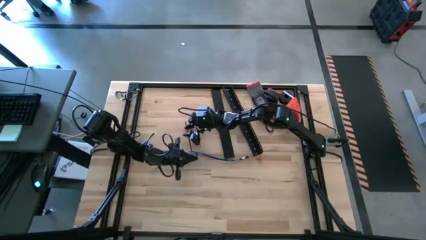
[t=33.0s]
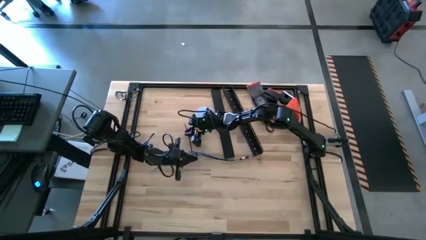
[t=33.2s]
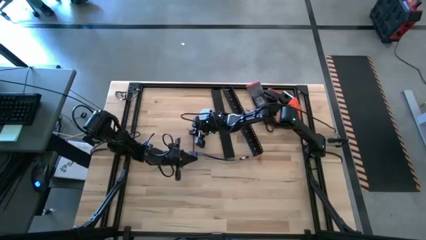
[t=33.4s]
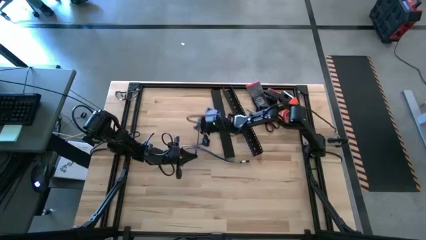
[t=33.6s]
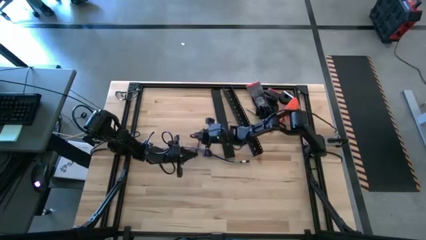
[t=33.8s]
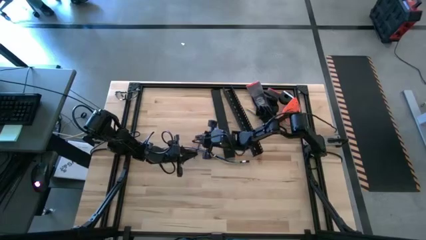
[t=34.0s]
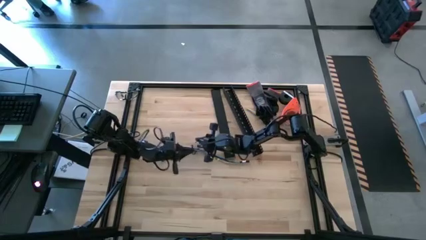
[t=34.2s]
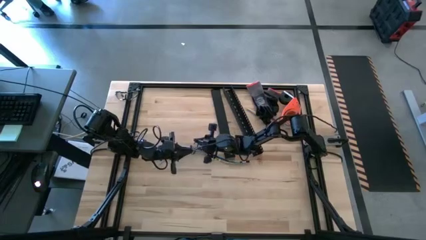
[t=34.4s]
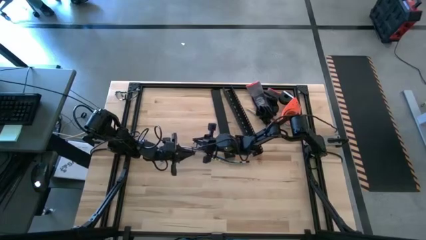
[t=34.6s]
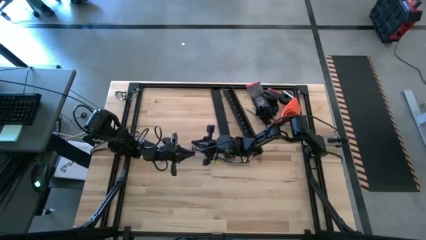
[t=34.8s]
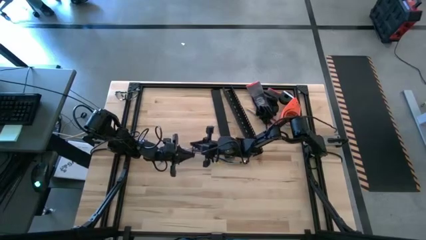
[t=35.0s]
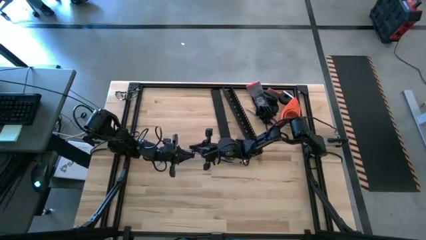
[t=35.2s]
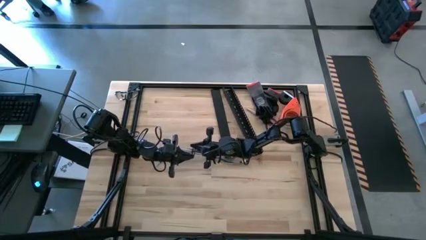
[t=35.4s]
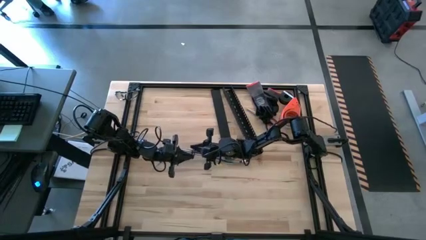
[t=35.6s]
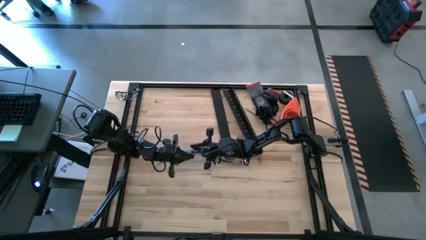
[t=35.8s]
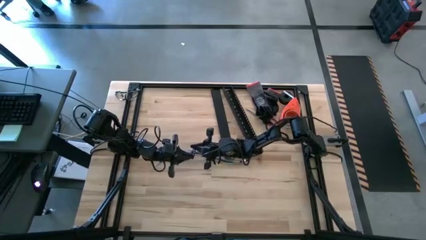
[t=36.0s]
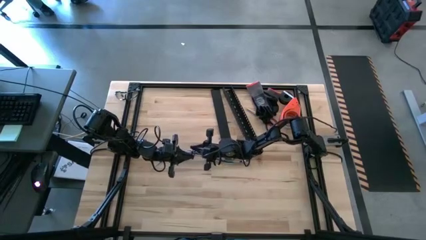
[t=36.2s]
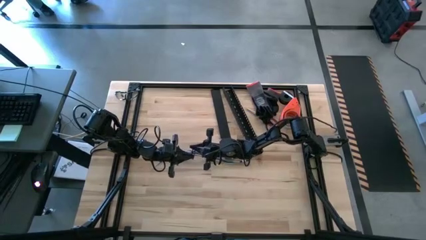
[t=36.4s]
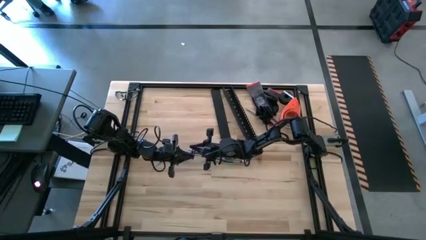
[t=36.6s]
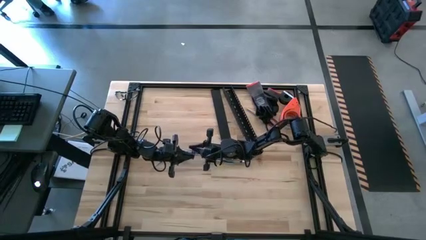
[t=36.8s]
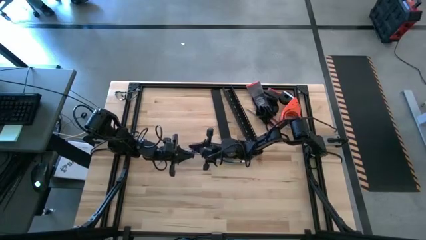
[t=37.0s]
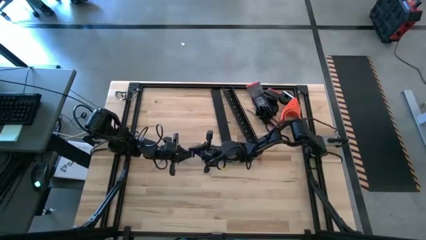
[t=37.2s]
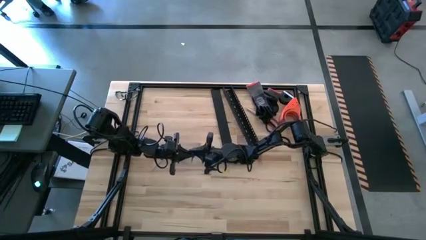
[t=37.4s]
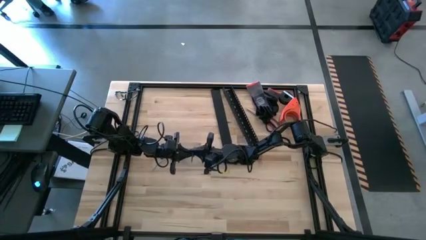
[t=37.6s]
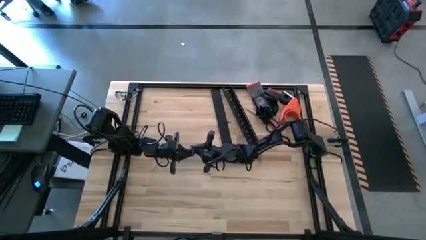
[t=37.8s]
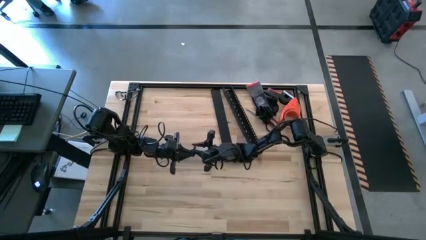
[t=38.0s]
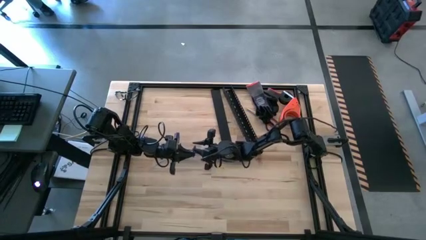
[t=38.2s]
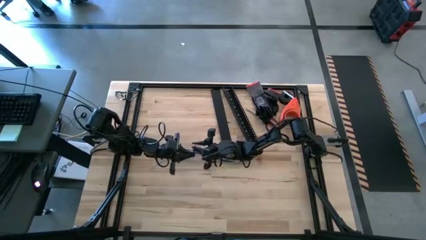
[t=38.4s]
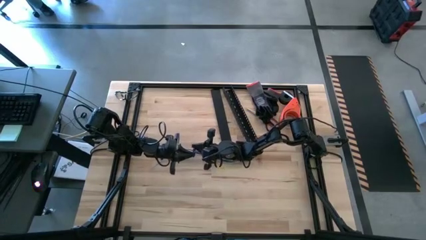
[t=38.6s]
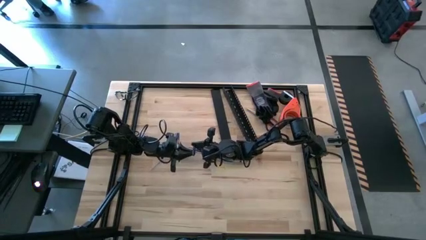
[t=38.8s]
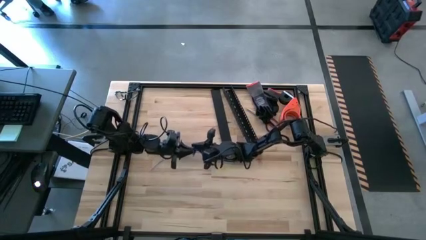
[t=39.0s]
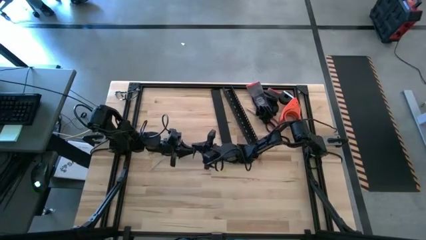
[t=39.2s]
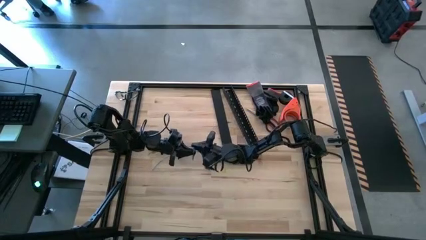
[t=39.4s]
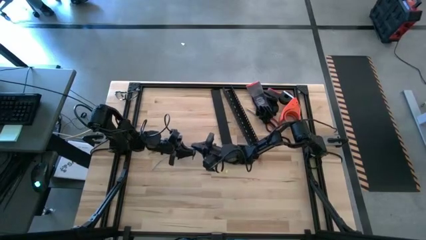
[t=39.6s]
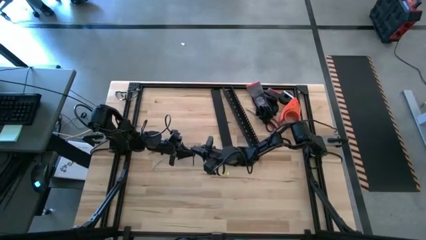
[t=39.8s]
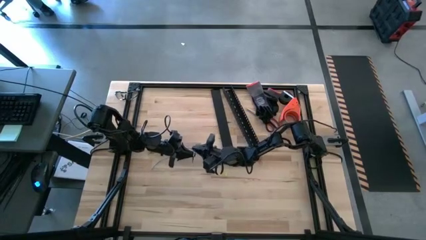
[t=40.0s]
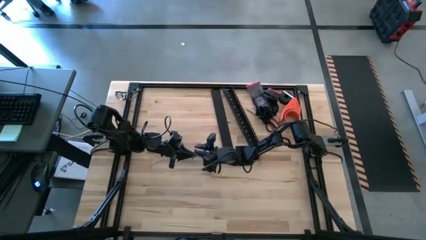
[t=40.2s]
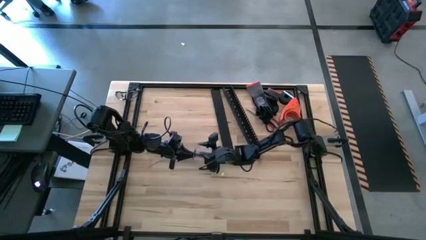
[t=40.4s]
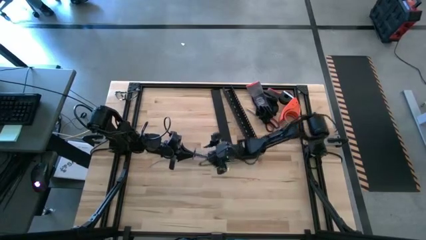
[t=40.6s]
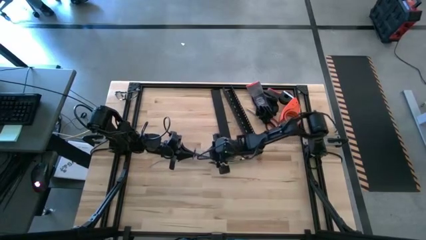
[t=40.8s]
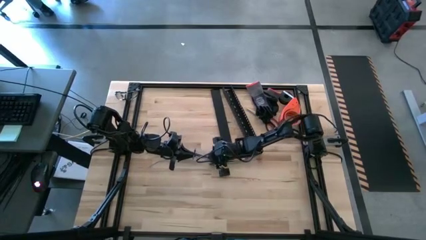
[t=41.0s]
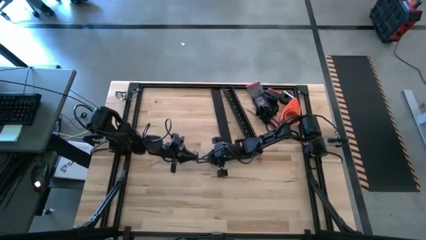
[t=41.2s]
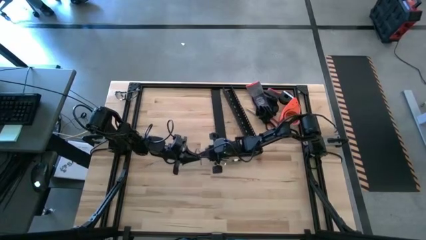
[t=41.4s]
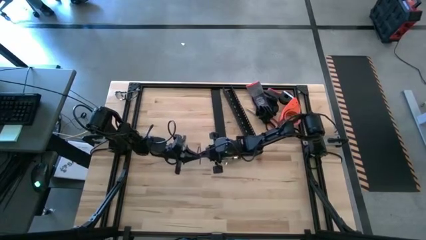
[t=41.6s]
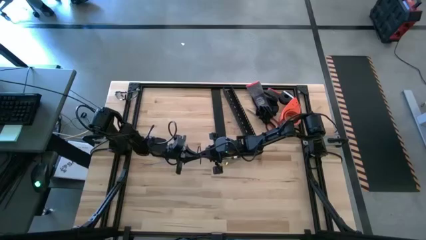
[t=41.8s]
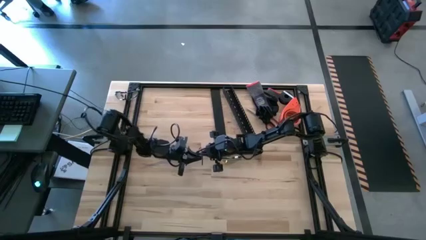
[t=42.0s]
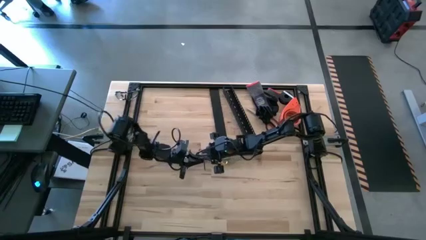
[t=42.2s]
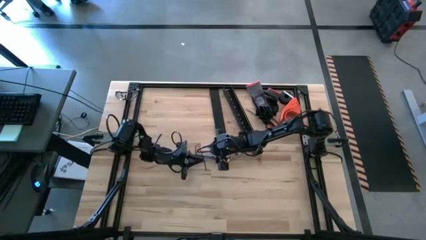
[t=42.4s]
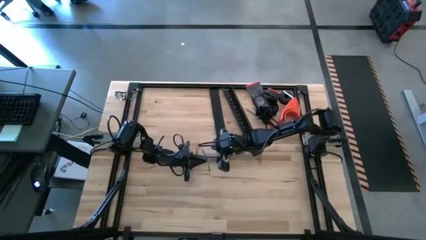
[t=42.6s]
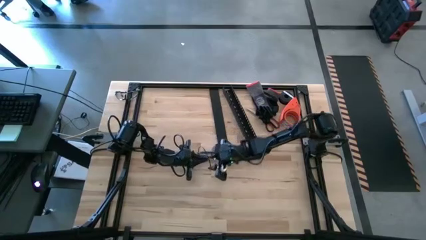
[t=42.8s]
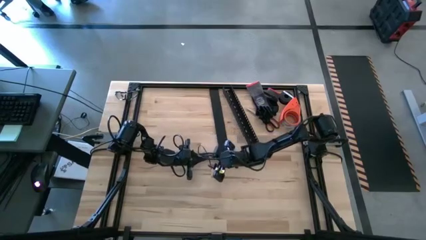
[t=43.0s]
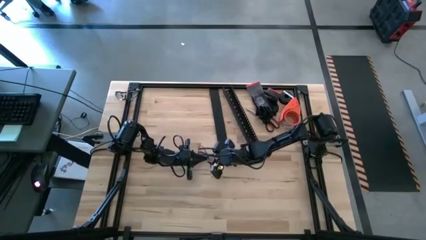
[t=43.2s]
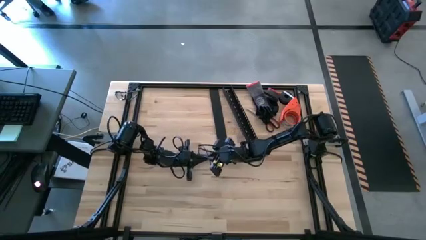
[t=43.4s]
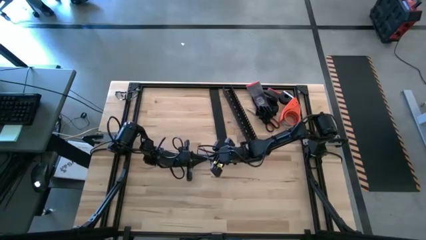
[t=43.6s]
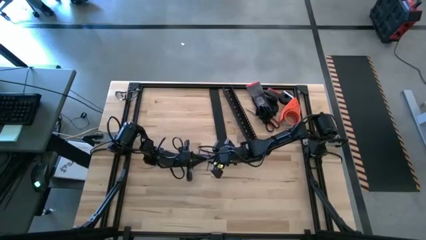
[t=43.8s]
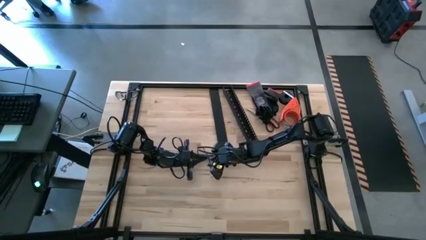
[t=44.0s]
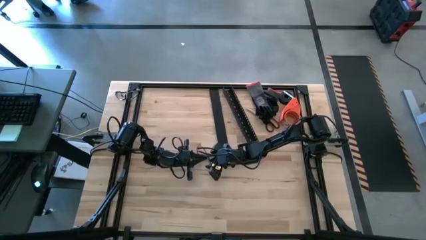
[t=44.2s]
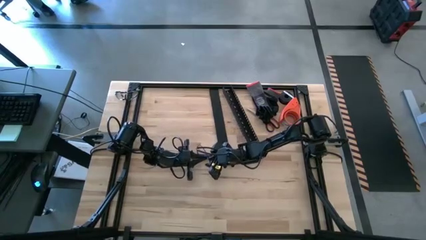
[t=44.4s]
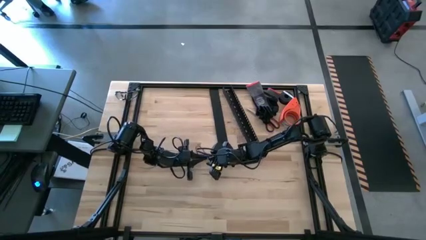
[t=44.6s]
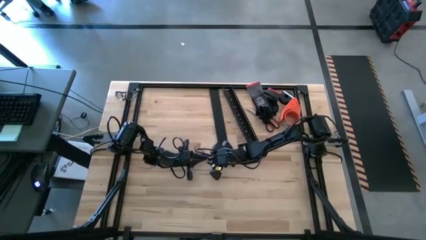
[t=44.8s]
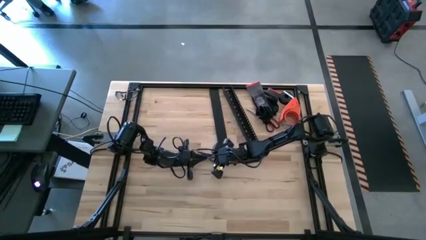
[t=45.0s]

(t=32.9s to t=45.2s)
Task: Ziptie cables
Wrap the black zip tie around the cable wires

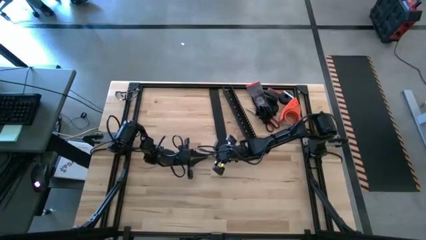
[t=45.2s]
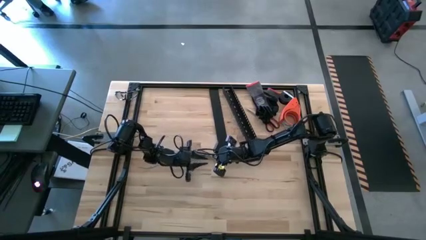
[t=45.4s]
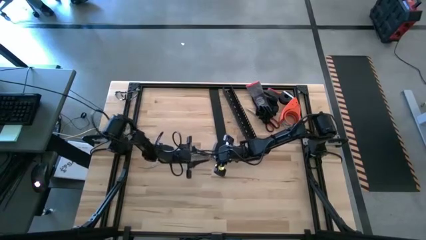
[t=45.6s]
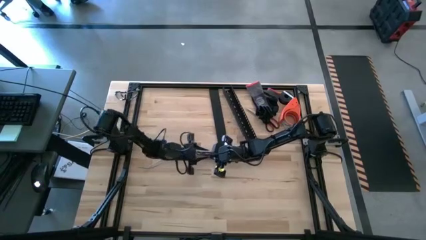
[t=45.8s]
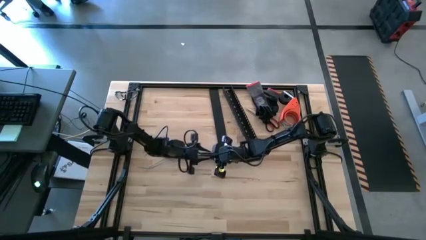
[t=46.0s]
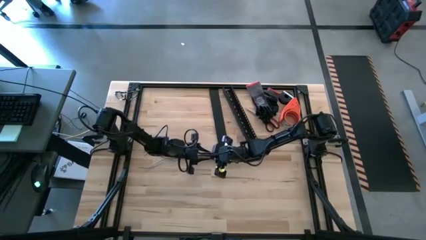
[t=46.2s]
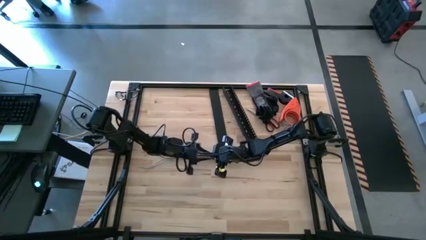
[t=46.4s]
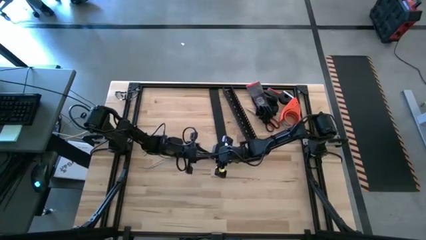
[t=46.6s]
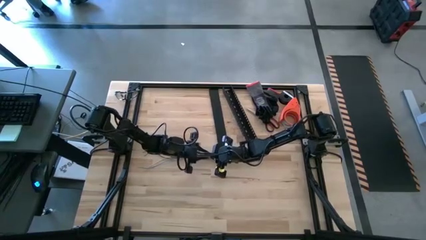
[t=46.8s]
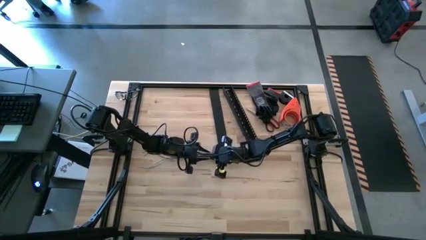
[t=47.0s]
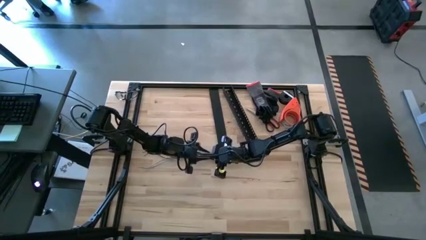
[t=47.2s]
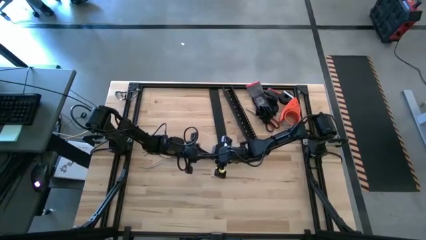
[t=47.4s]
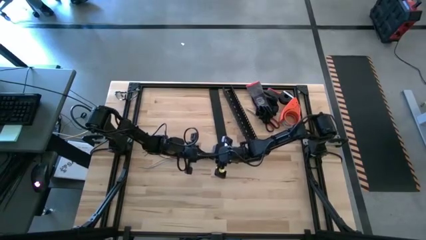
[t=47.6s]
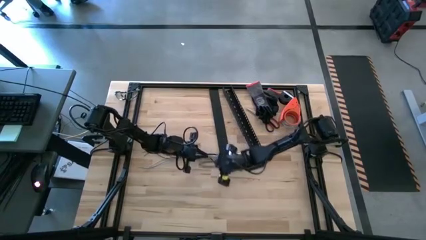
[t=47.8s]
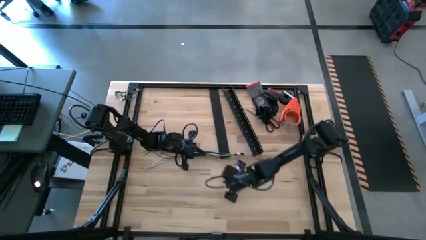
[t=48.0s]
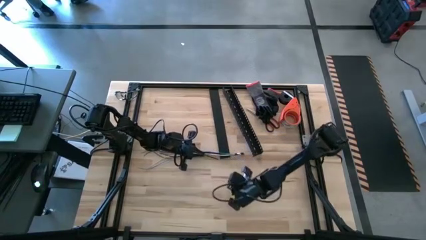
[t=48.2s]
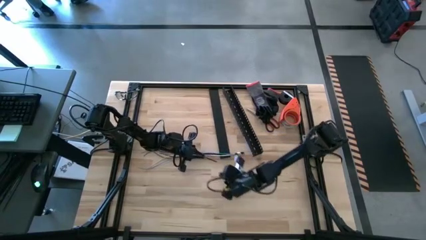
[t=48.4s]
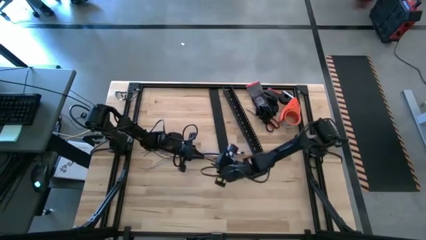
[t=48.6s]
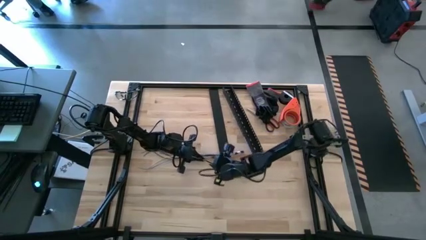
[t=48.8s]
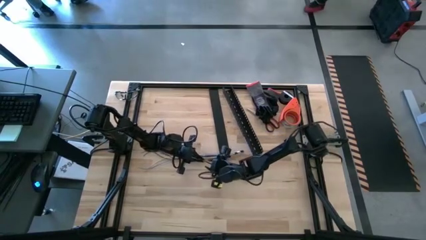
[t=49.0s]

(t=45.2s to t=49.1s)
Wrap the black zip tie around the cable wires
